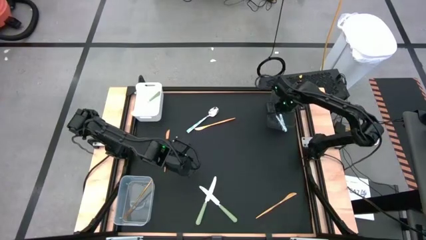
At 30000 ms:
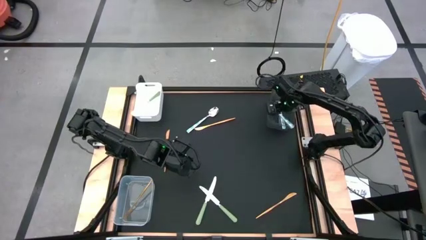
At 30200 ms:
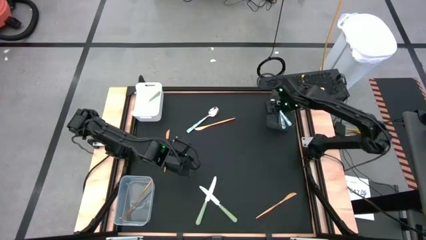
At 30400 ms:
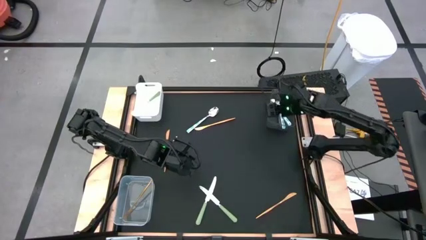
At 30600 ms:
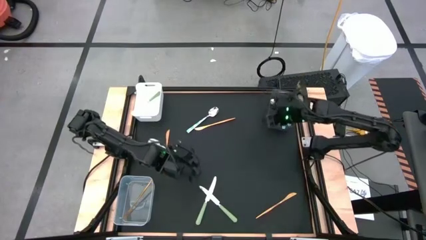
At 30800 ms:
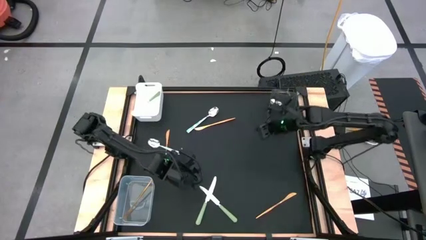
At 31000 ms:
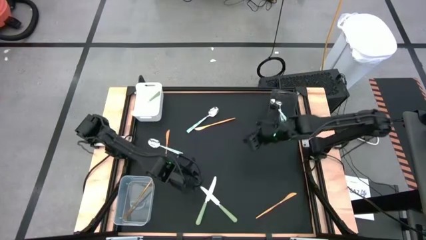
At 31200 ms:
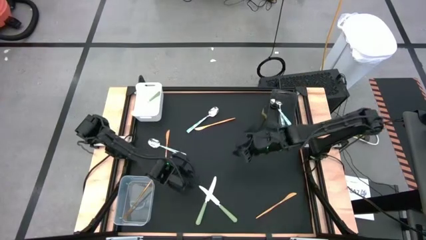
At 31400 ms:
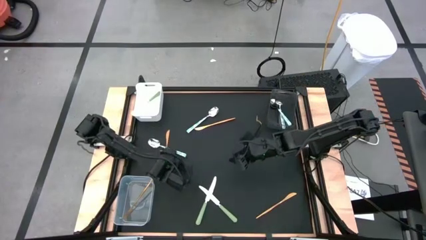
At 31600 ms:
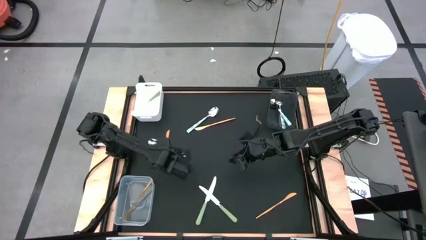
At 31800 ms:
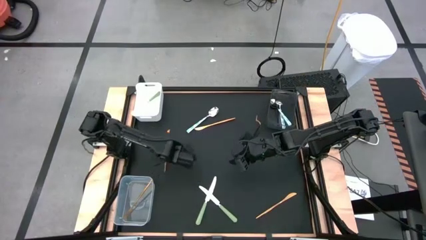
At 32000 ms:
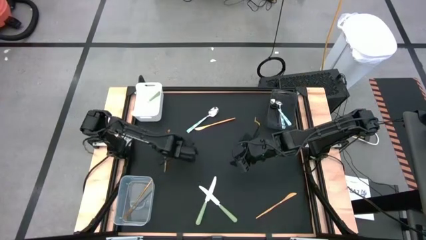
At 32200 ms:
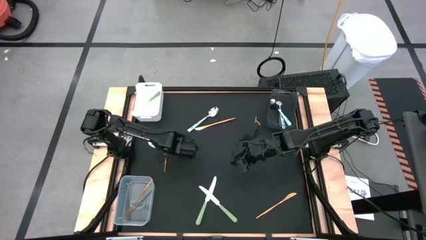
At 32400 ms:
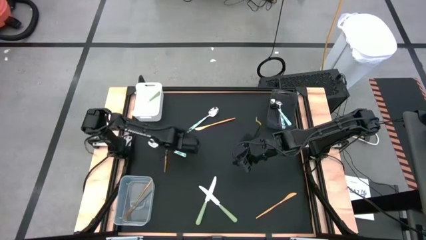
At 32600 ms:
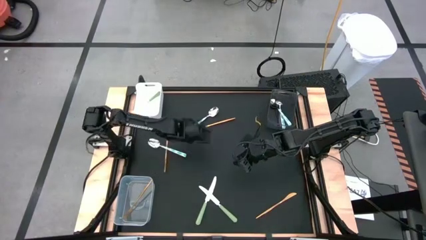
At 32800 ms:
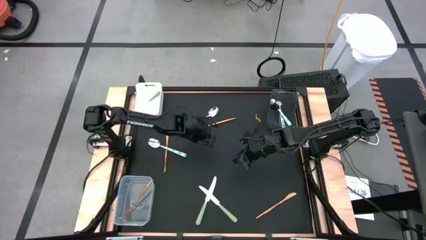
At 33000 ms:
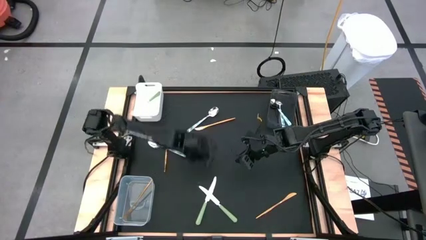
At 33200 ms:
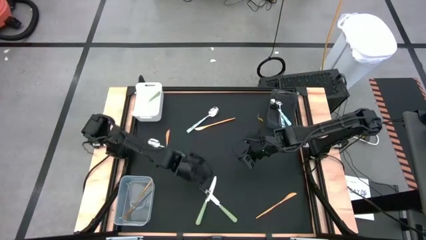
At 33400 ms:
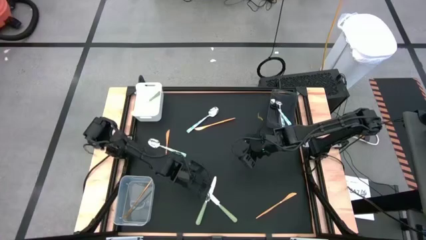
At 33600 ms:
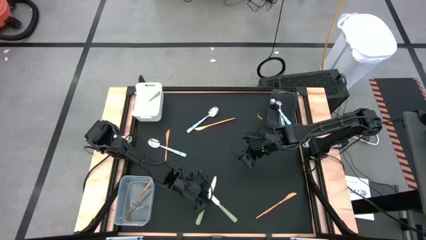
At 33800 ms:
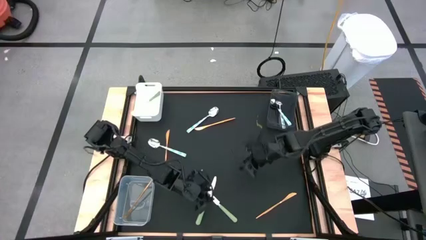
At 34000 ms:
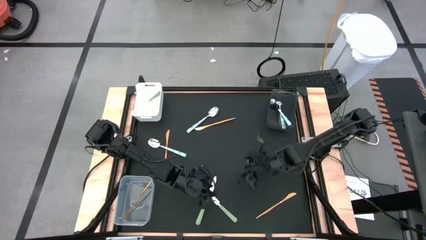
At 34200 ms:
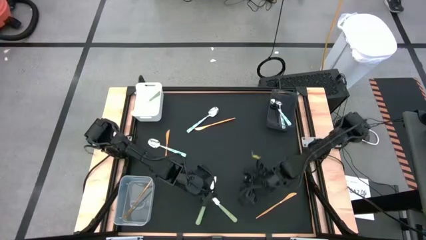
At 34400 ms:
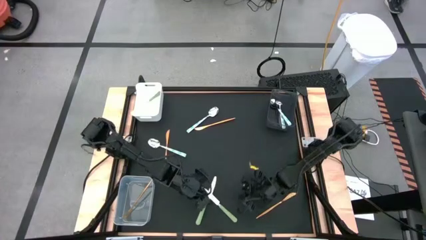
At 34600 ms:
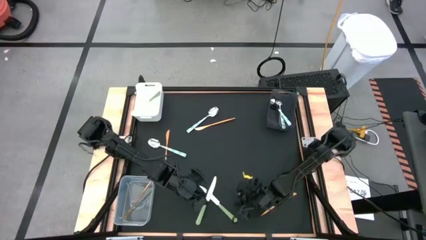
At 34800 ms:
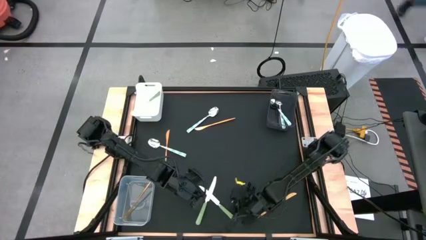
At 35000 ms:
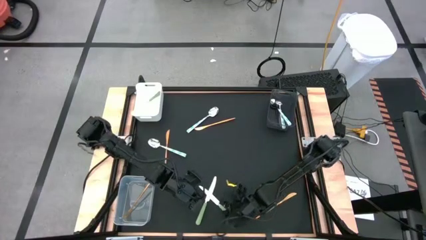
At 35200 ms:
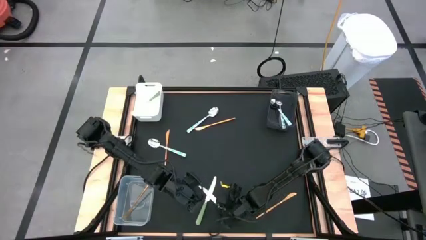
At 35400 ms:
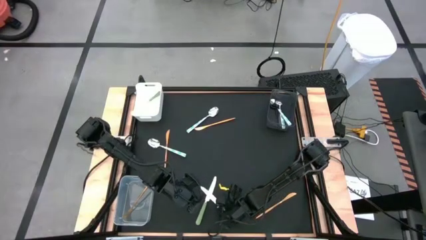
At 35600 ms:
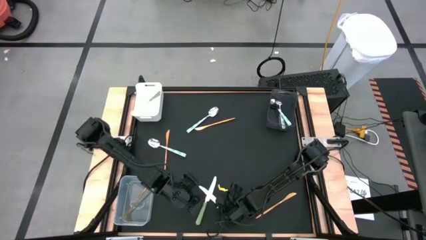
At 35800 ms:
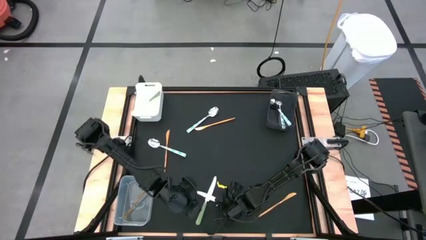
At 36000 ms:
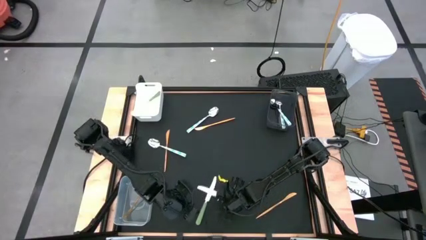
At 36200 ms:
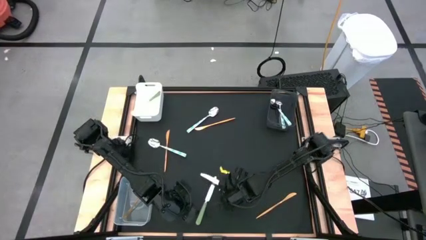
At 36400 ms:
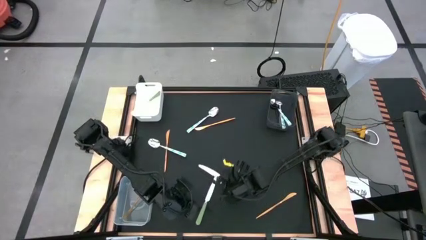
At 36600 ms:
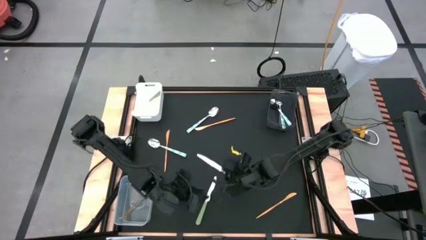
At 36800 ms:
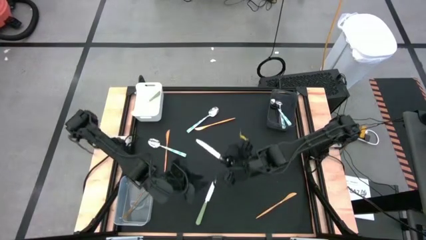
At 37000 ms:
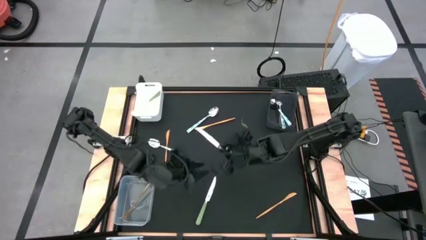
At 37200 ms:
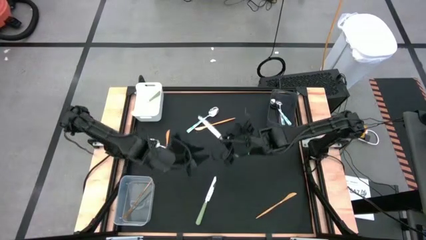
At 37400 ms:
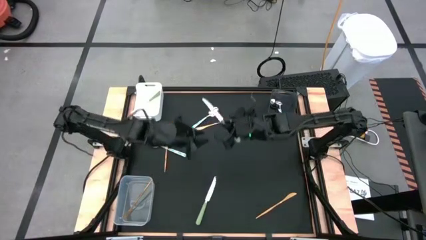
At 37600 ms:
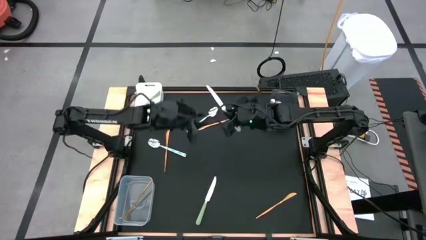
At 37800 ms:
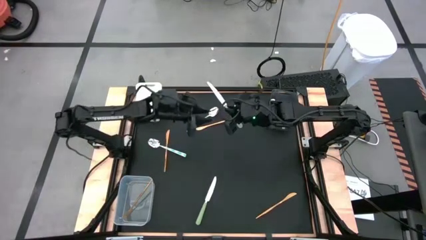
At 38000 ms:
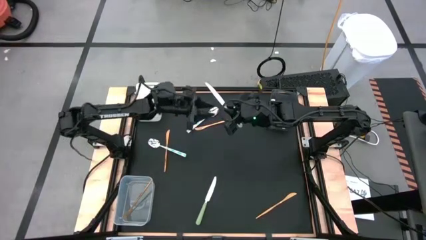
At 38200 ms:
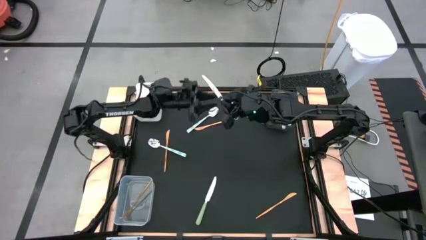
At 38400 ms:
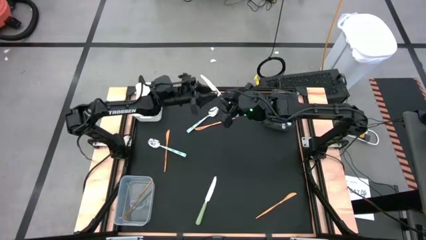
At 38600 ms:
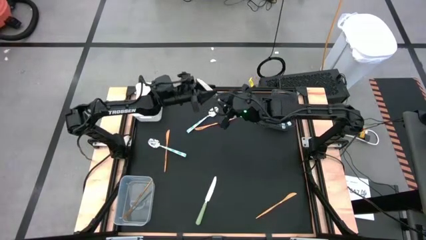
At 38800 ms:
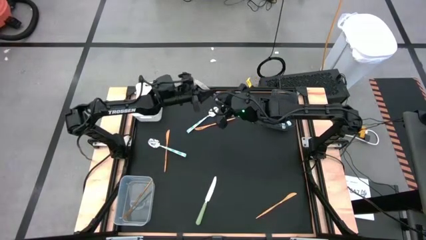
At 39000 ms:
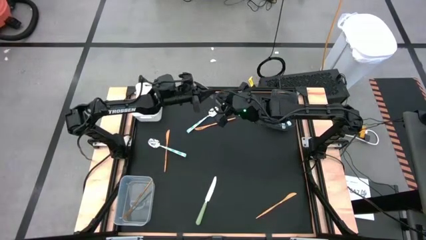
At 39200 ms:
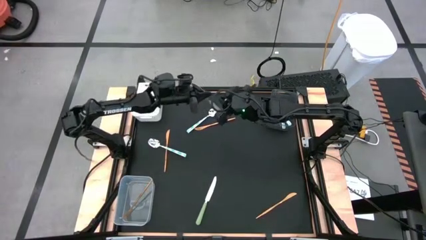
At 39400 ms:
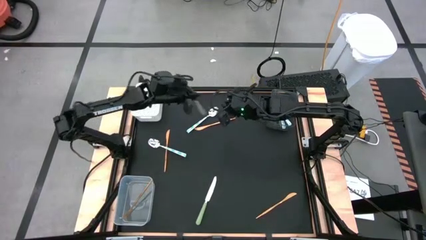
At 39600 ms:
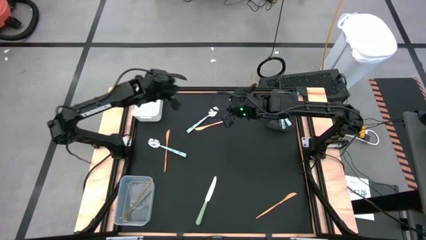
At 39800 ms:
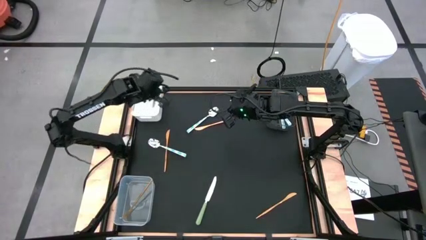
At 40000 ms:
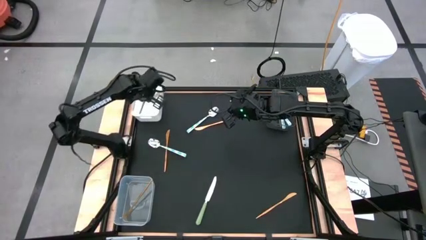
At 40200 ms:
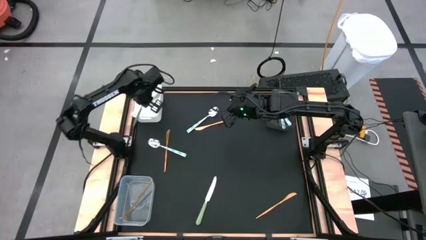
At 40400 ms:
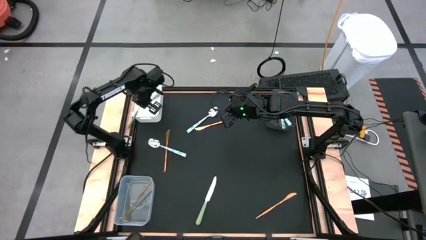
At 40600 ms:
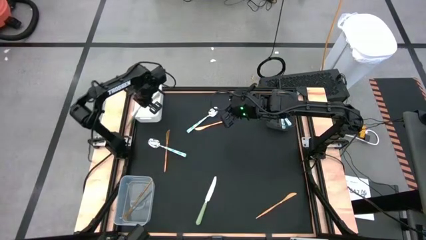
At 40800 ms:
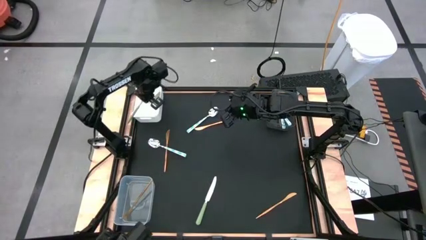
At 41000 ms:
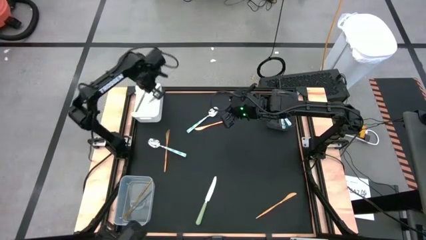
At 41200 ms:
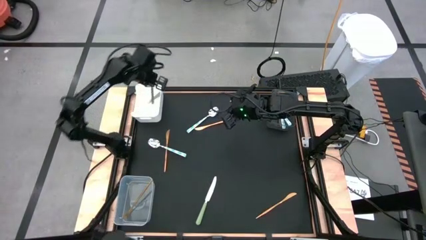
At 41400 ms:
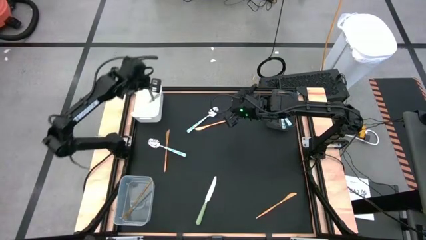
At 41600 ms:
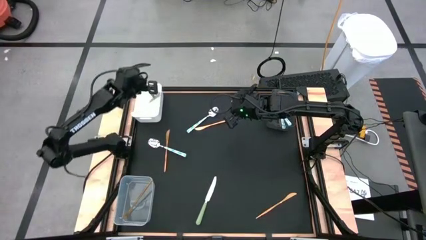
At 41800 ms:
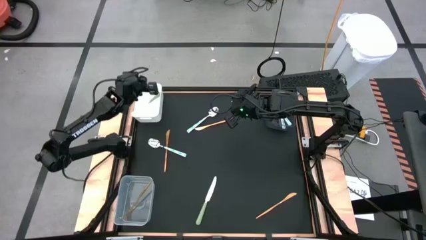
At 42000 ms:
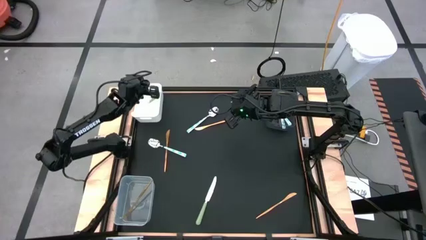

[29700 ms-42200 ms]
Task: Sort silverware by color (type)
Put the green knife into the white bin

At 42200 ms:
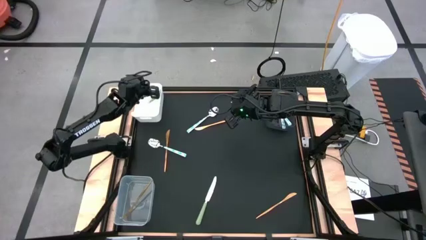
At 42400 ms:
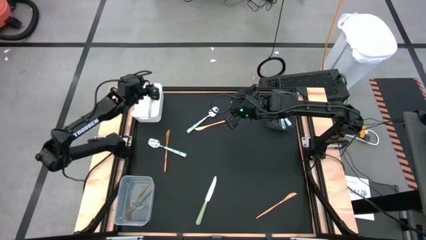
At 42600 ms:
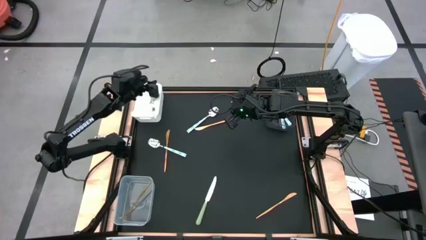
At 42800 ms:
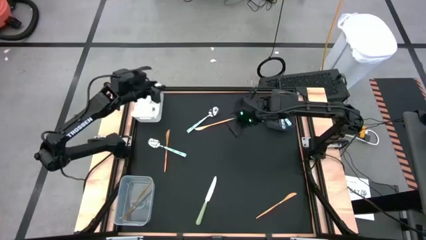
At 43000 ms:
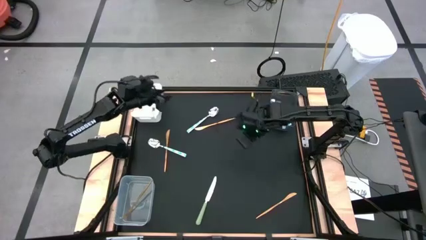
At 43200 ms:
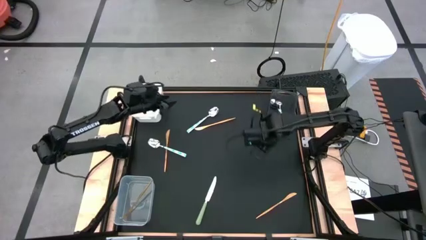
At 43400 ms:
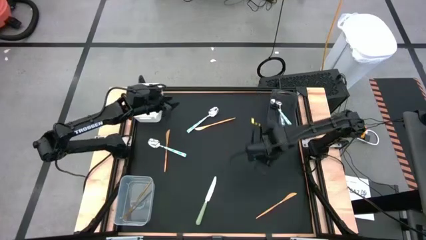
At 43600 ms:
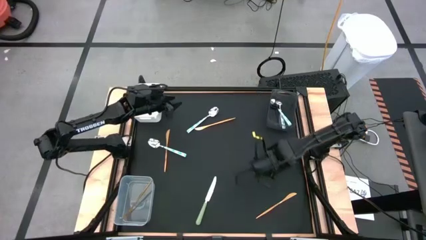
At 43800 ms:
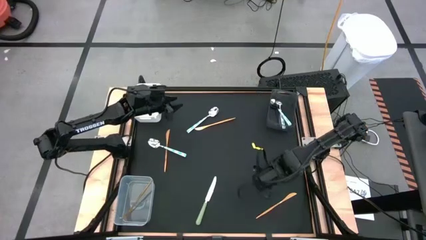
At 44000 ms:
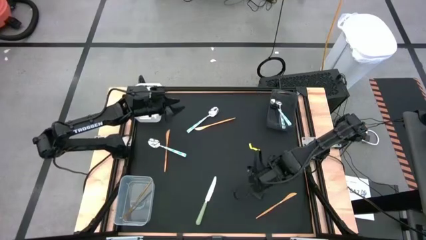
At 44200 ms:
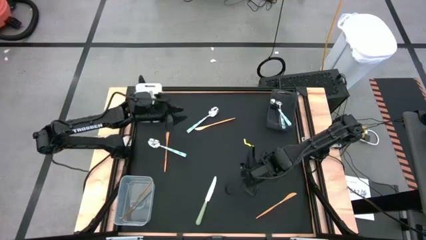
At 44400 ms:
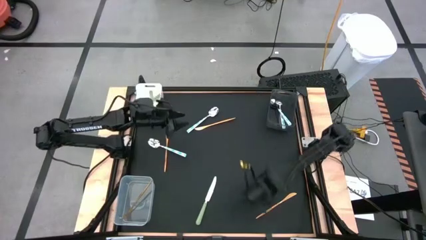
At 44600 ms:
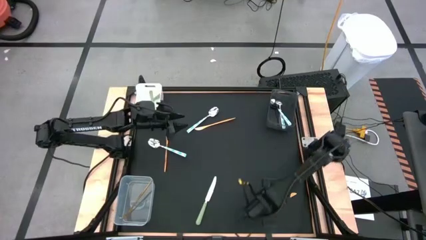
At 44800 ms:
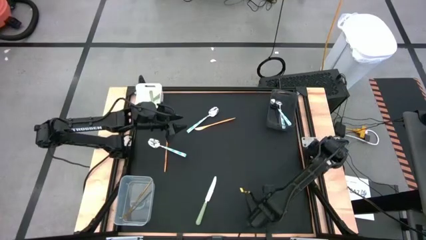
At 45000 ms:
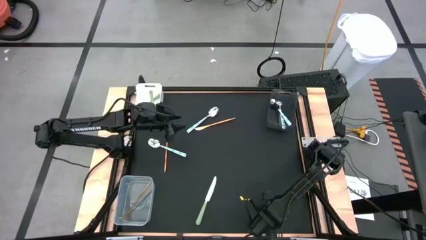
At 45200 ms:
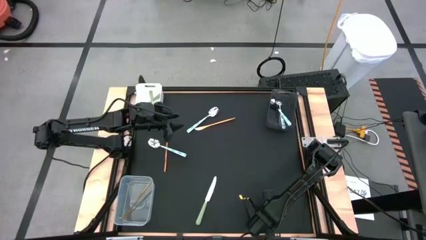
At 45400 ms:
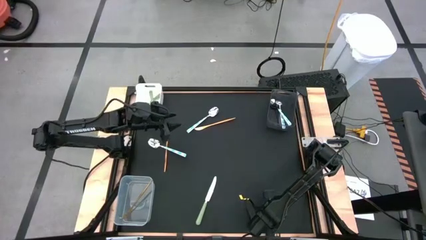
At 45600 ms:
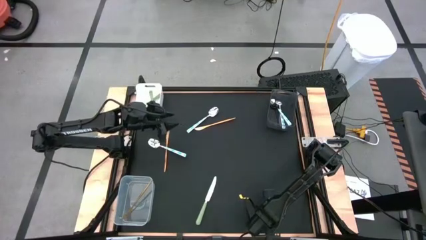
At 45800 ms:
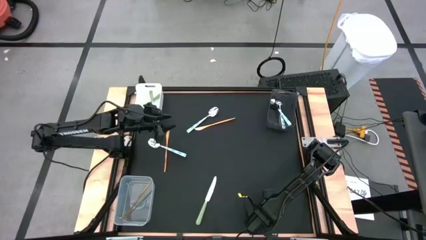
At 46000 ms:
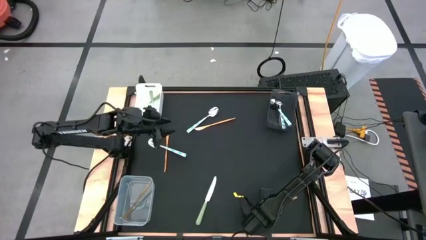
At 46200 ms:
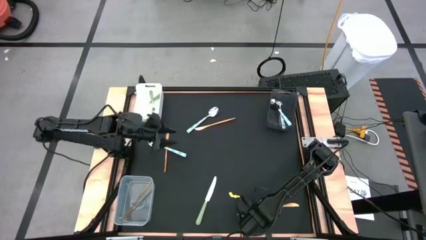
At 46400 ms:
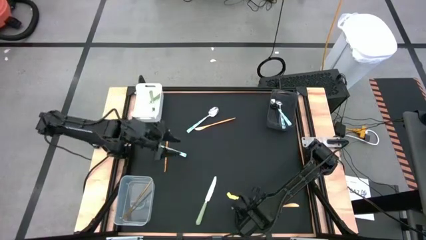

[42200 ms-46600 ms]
Put the gold knife into the transparent bin
